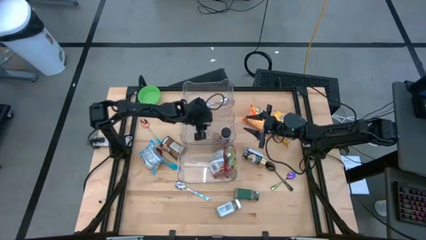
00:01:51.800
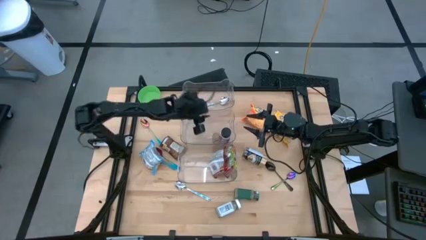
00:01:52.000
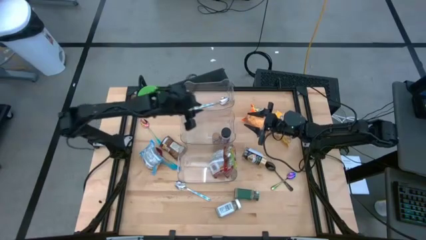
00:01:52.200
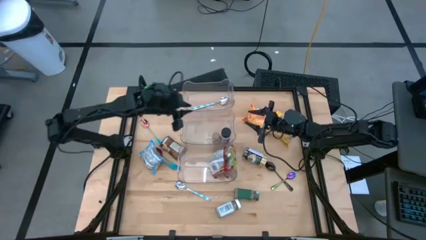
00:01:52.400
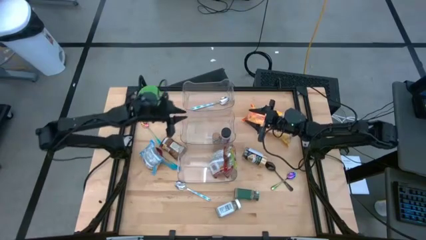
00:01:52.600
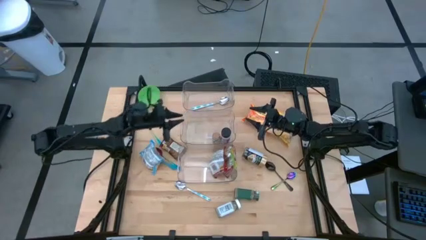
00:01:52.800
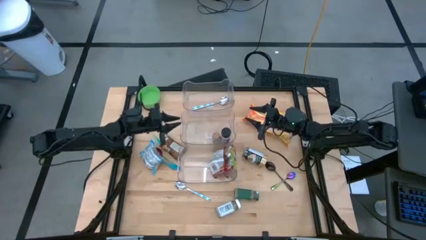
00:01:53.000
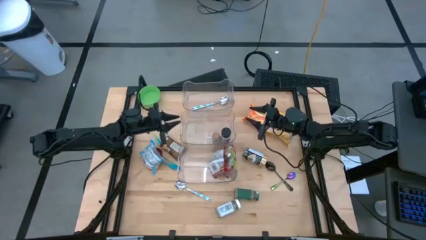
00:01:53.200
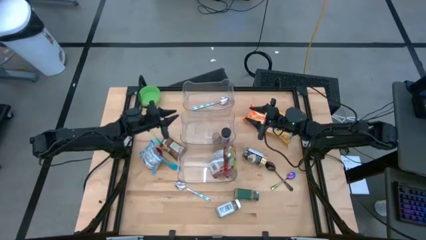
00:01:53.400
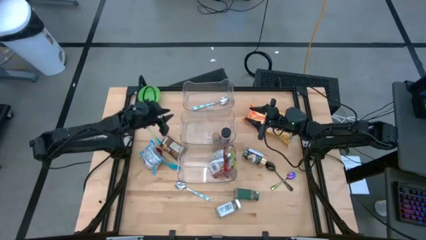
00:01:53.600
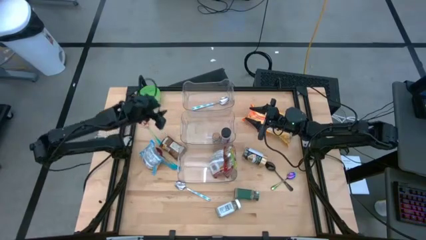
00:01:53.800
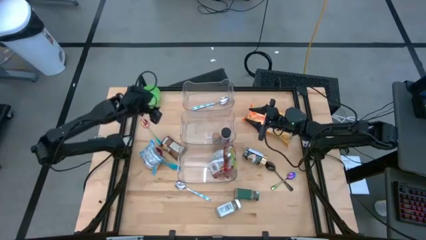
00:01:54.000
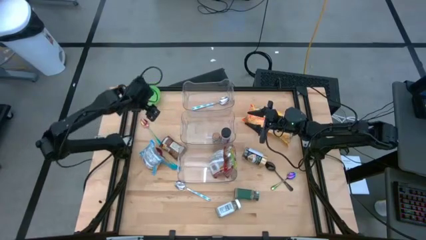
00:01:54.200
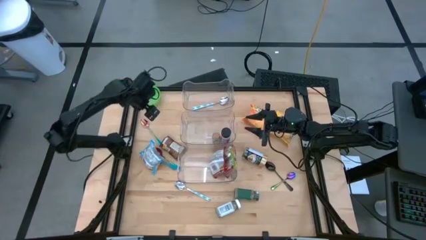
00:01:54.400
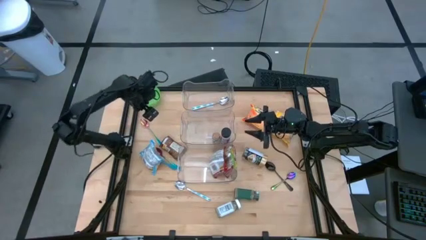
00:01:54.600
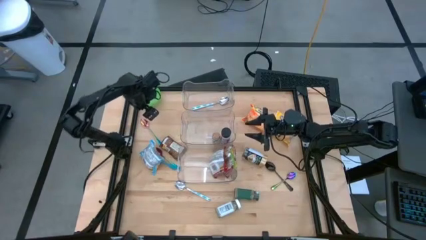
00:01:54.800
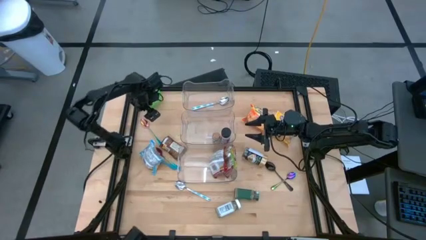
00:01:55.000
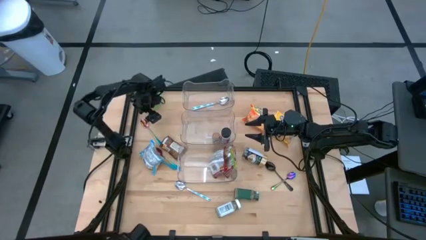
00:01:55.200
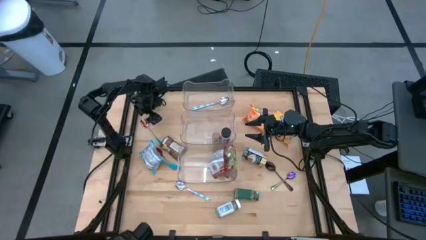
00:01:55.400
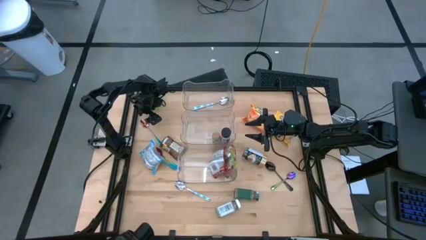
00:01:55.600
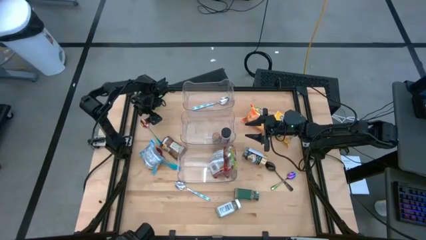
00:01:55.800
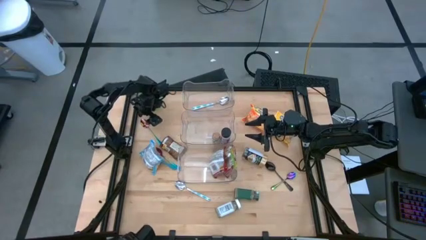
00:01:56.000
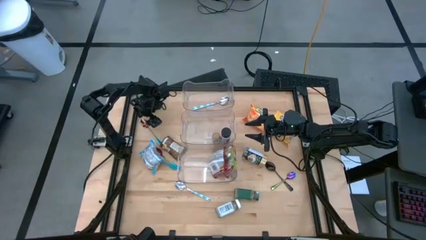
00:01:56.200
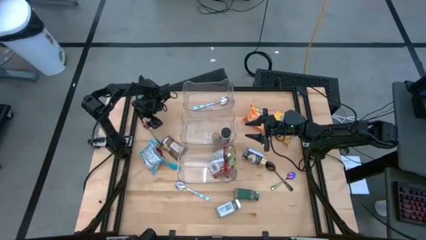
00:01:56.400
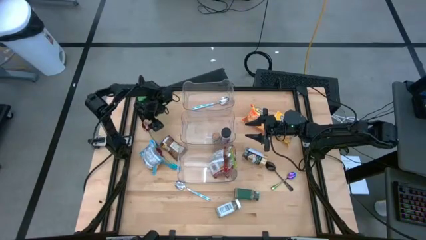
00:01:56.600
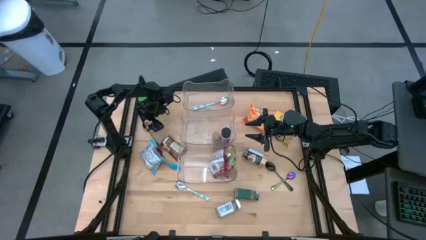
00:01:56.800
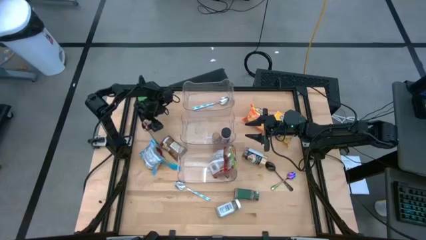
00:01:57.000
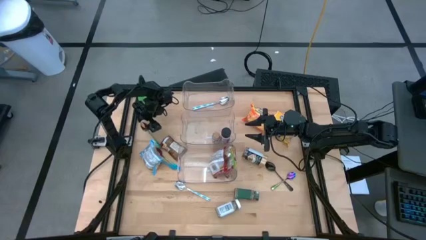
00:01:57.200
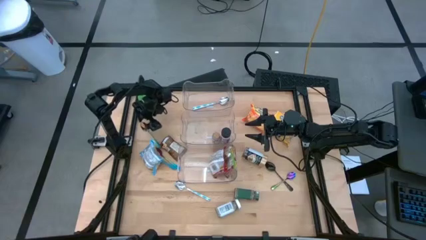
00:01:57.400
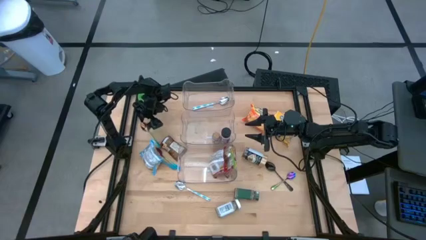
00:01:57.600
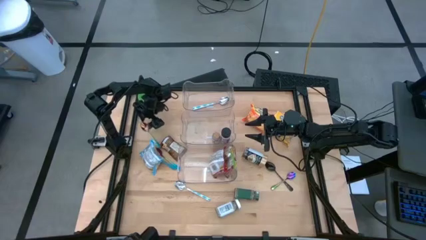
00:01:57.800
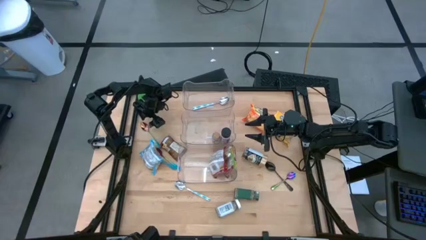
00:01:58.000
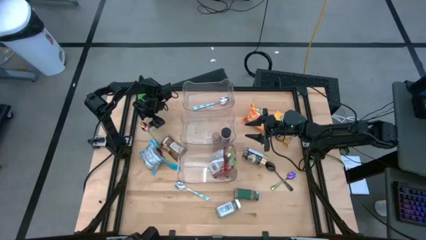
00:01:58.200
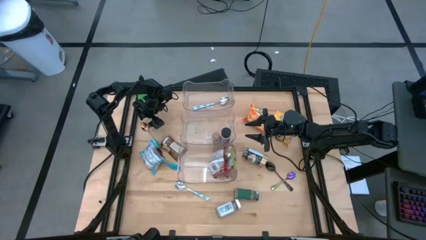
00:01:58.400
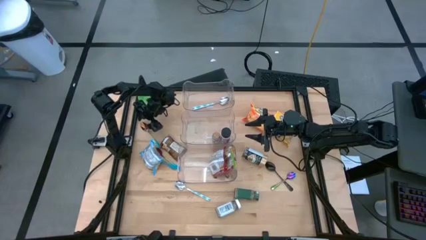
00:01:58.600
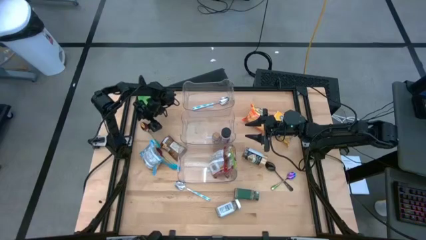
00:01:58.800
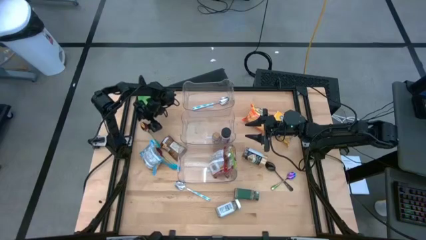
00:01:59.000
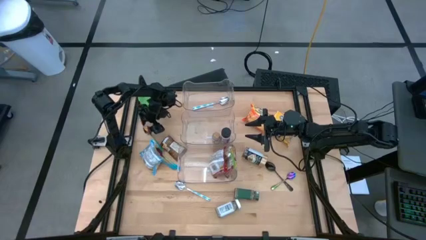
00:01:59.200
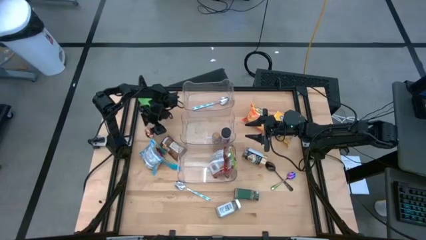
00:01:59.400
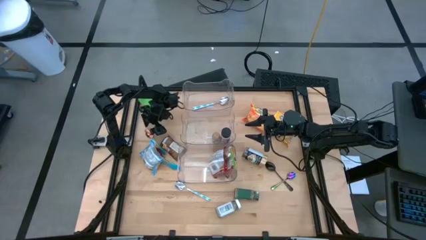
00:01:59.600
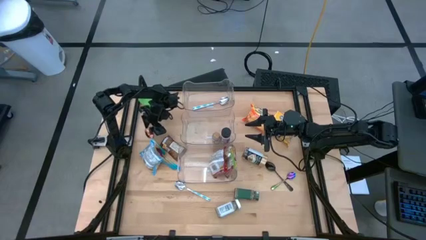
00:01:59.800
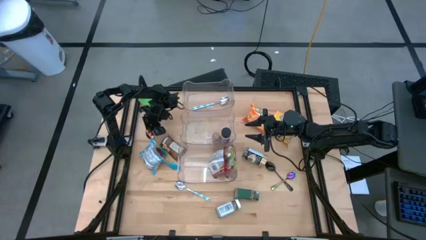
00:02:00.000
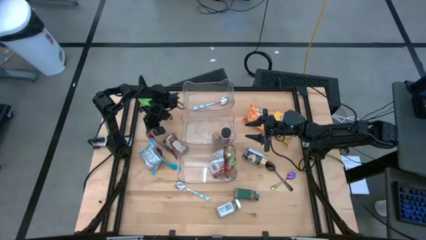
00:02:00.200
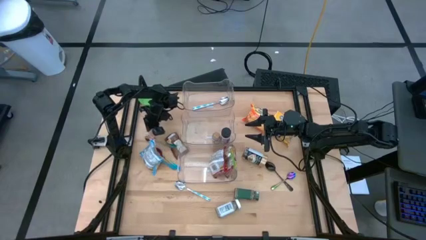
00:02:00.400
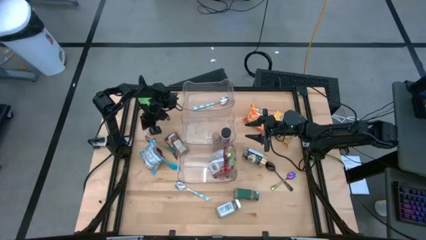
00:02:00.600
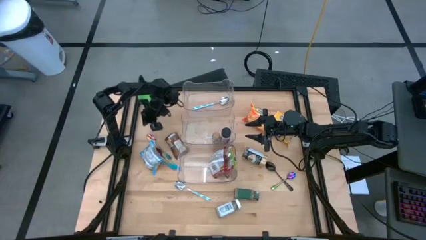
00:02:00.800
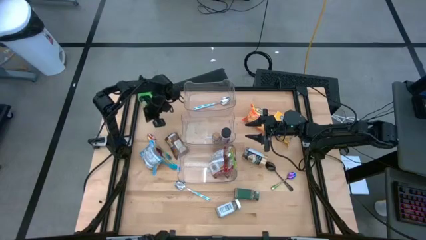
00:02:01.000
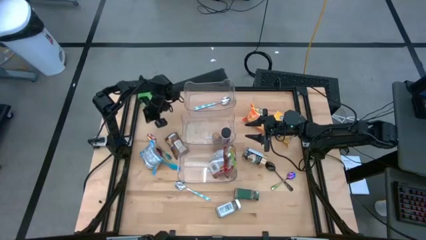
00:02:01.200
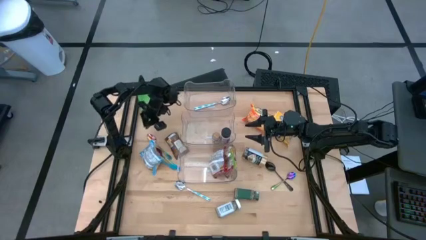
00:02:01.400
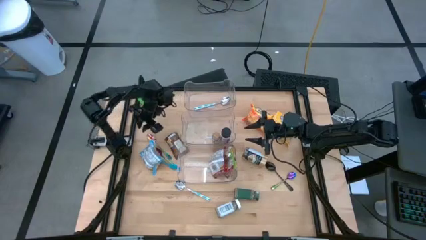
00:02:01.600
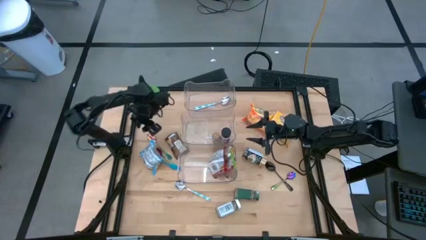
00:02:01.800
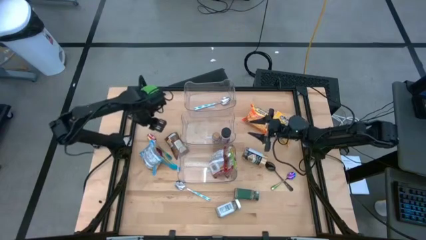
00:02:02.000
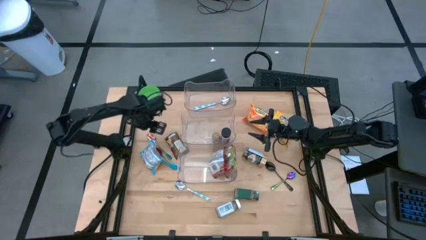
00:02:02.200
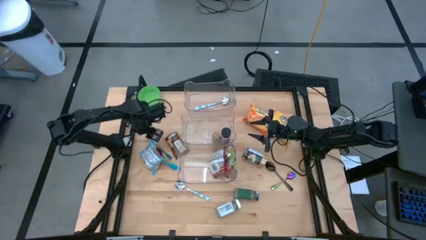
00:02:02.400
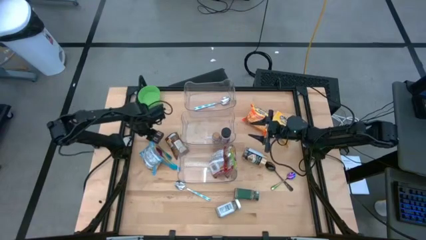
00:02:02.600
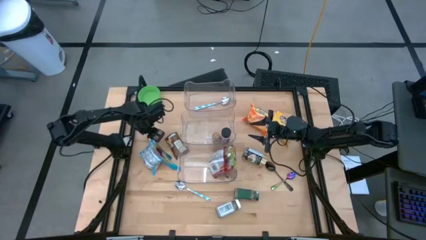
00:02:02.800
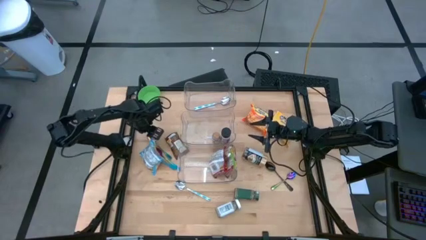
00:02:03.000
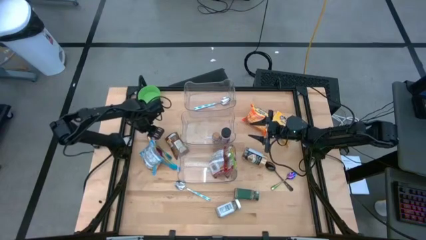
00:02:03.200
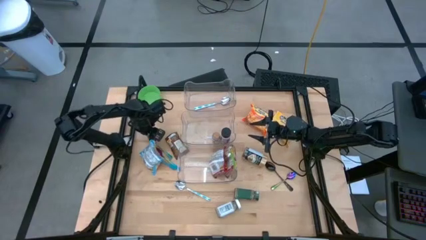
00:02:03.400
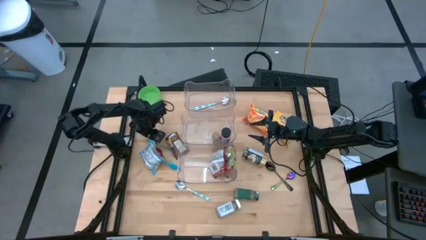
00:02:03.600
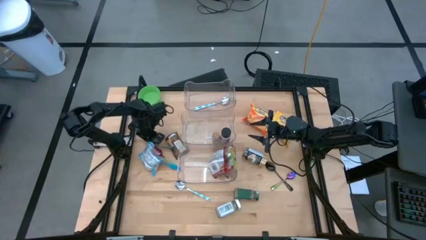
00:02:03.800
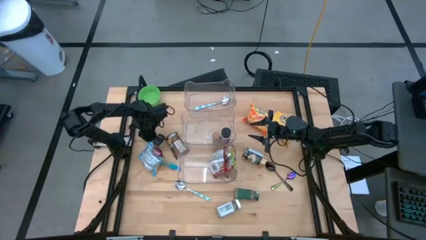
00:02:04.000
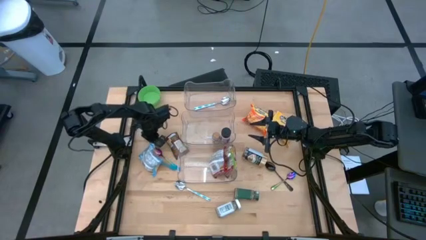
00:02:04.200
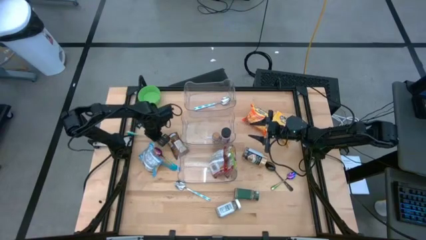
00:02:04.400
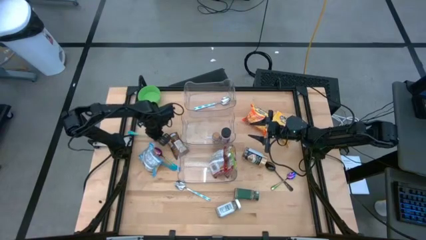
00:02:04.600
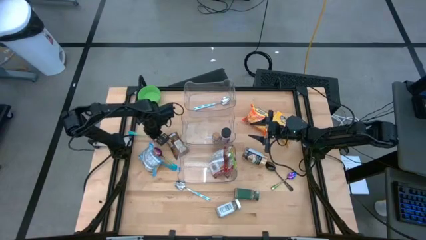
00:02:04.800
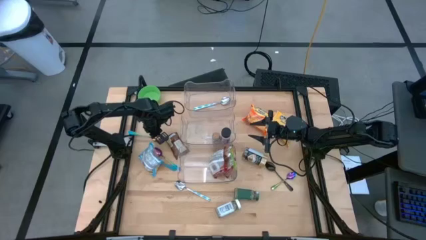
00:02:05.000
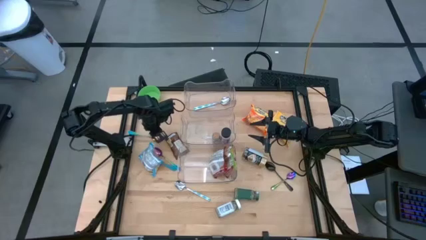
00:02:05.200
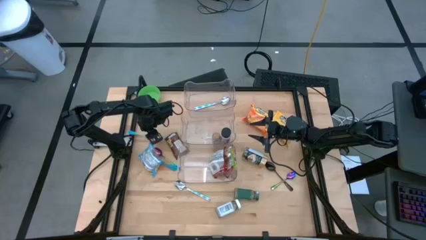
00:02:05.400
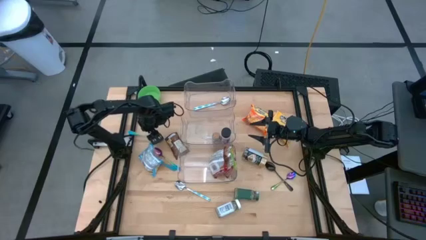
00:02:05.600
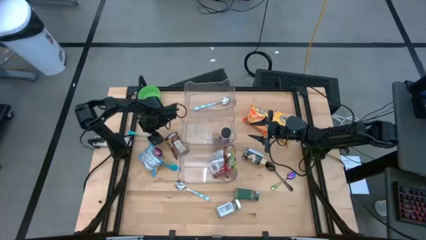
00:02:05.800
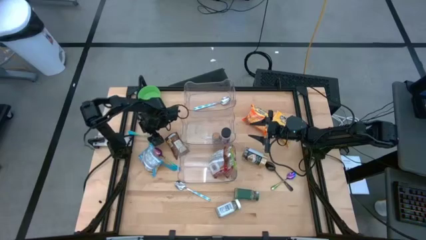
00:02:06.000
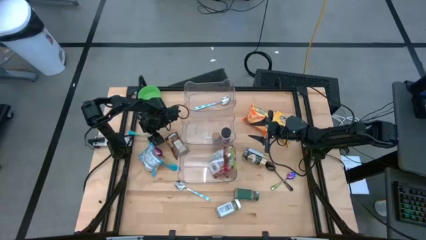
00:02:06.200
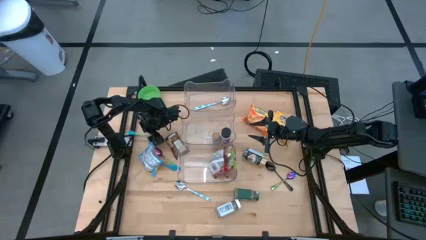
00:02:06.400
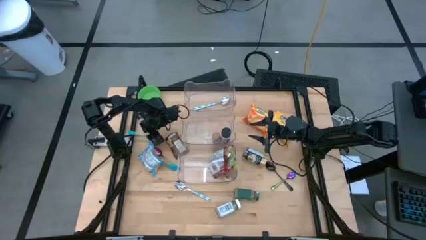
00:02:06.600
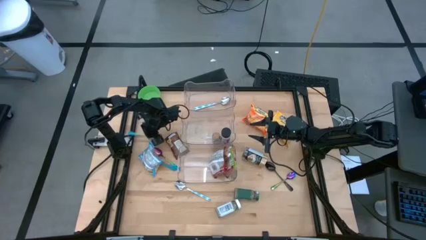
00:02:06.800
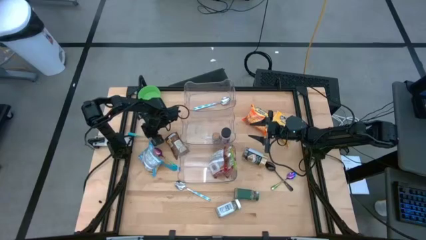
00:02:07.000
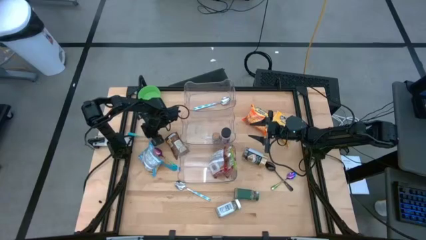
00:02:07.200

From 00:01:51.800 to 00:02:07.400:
Task: Pick & Place Food Item
Put the top blue spoon into the top transparent bin

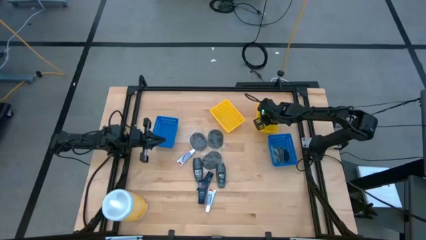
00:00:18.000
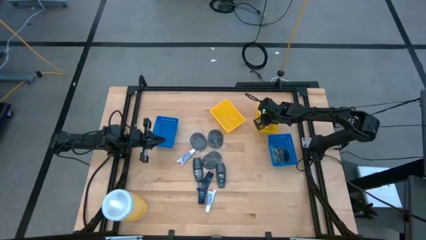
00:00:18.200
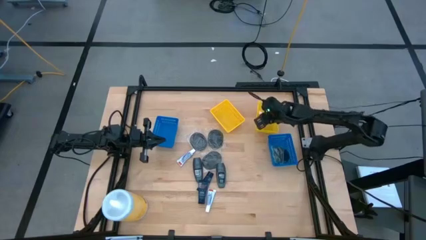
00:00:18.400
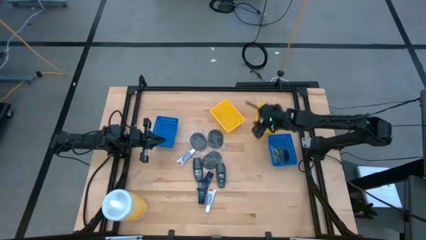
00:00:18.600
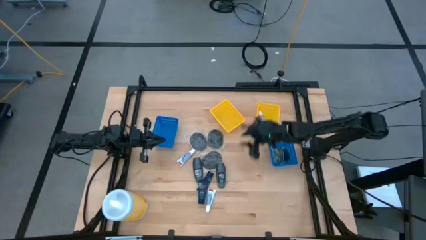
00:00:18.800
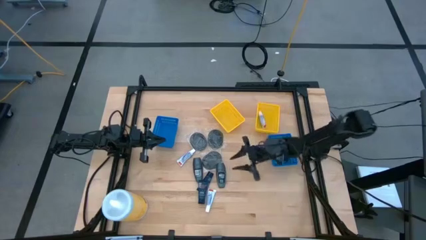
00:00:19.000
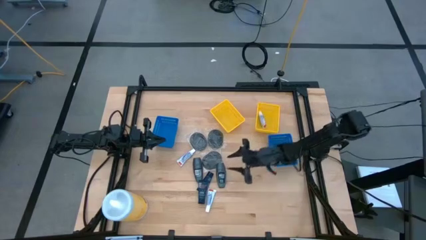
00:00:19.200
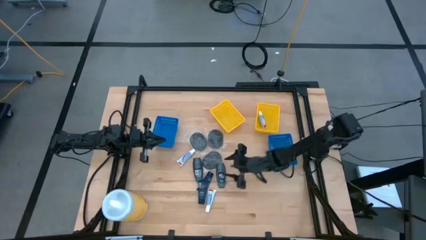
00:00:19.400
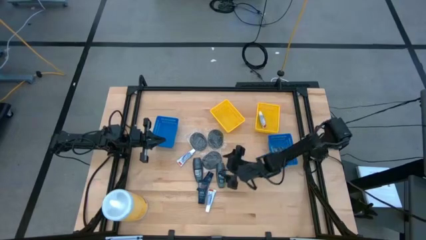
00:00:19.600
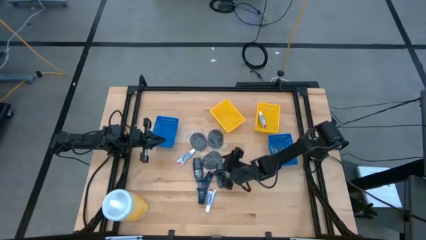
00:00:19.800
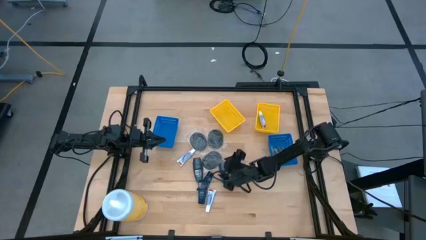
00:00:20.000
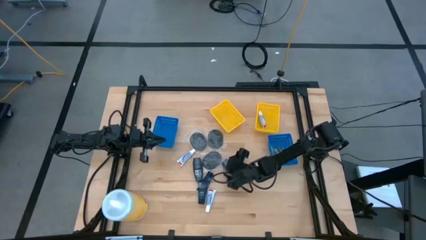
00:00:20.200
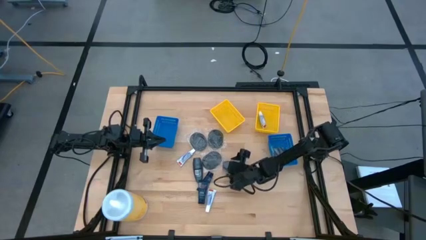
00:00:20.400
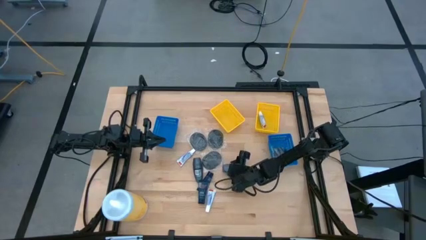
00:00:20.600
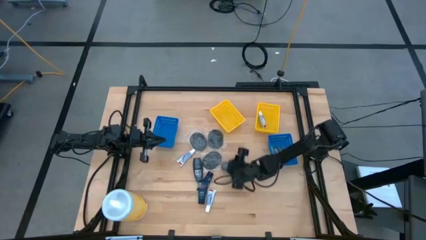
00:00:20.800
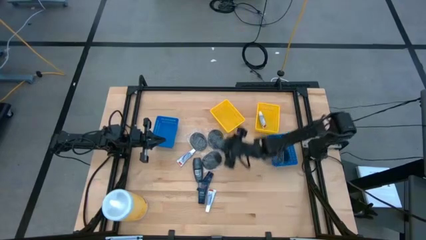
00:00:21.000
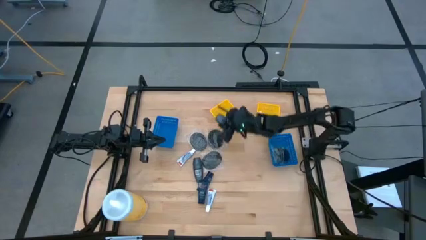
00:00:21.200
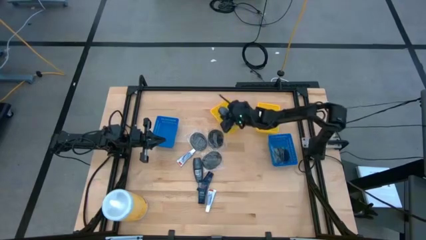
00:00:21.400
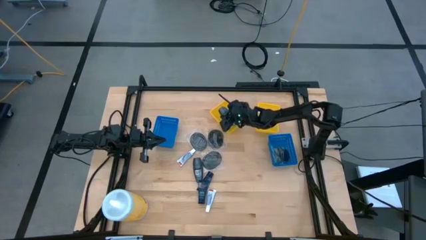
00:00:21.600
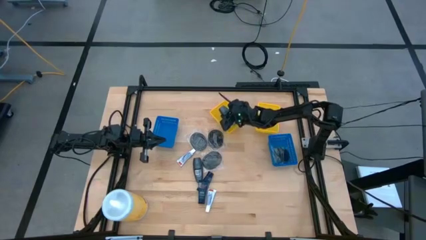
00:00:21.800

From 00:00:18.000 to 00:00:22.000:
Task: Pick & Place Travel size toiletries
Put the right black deodorant into the left yellow bin
